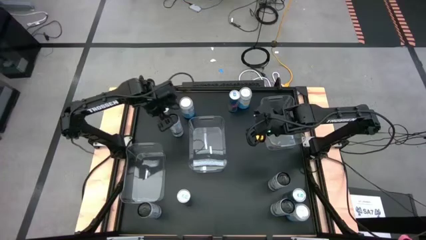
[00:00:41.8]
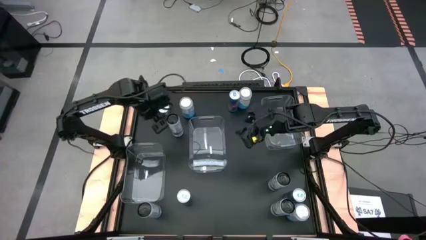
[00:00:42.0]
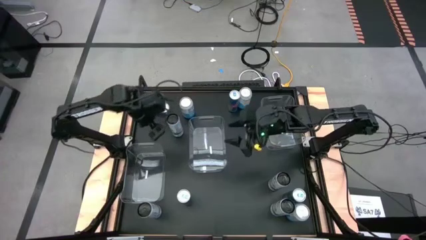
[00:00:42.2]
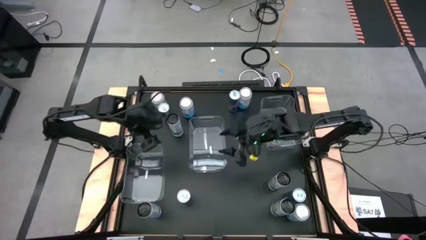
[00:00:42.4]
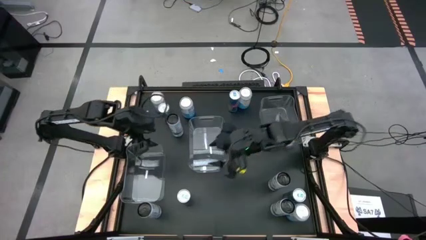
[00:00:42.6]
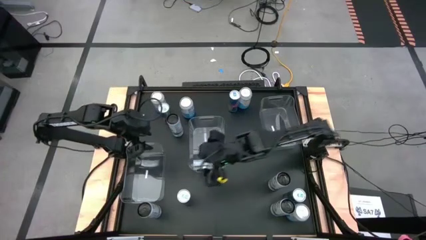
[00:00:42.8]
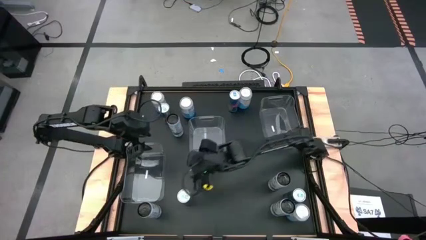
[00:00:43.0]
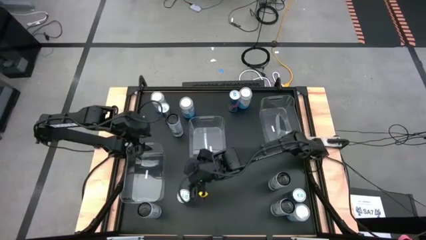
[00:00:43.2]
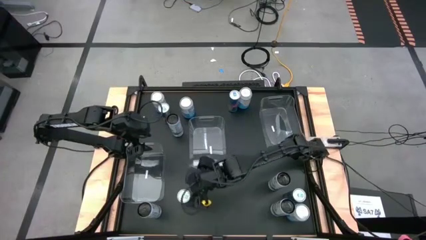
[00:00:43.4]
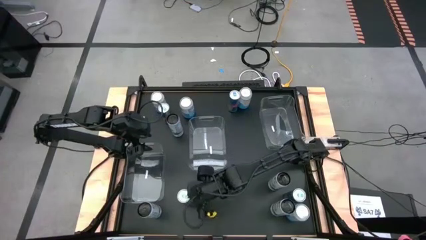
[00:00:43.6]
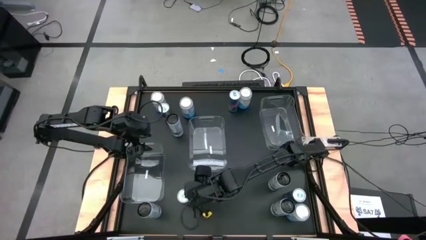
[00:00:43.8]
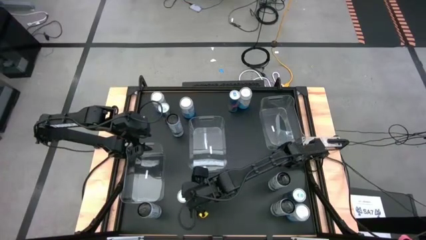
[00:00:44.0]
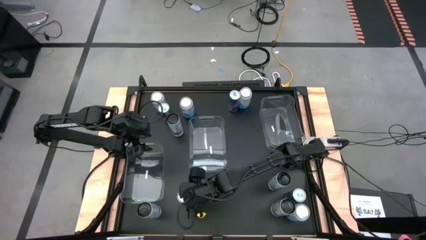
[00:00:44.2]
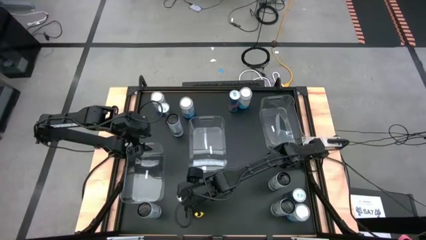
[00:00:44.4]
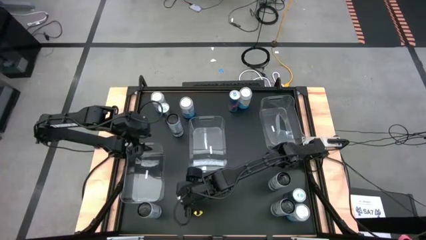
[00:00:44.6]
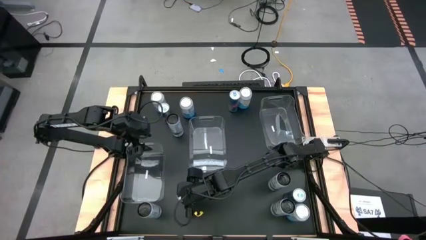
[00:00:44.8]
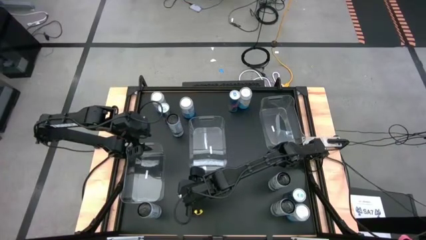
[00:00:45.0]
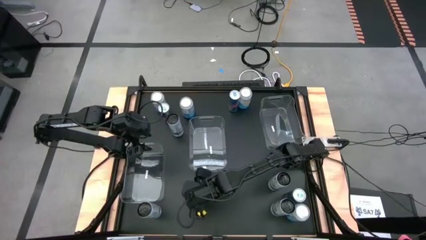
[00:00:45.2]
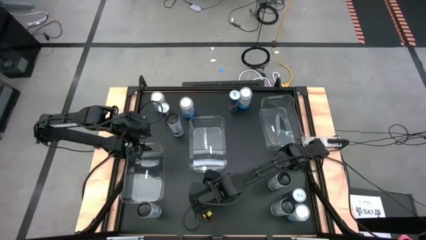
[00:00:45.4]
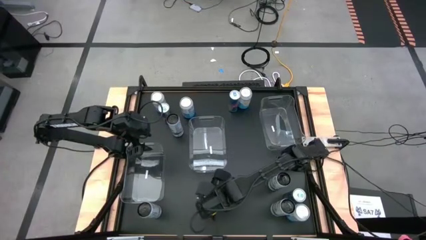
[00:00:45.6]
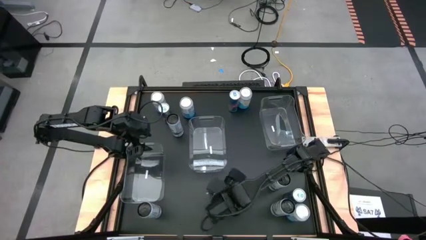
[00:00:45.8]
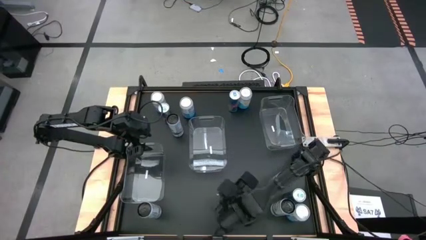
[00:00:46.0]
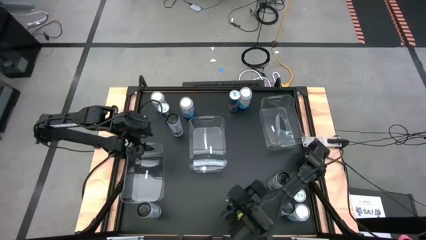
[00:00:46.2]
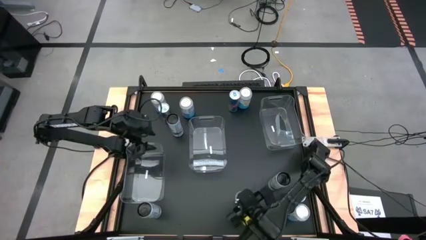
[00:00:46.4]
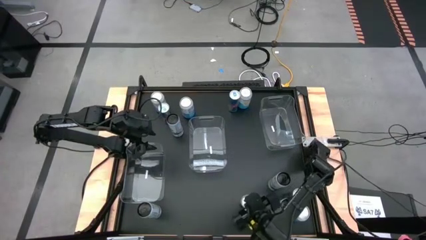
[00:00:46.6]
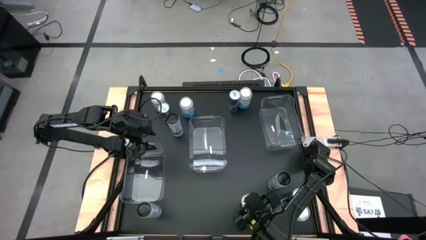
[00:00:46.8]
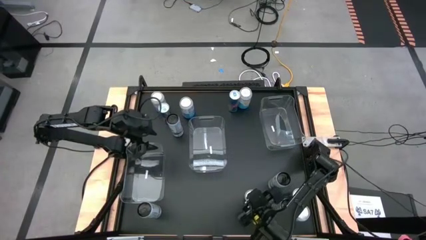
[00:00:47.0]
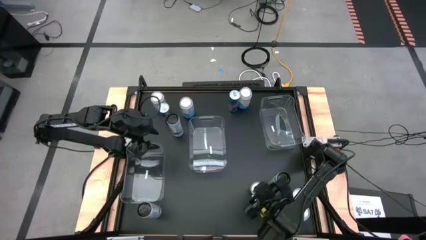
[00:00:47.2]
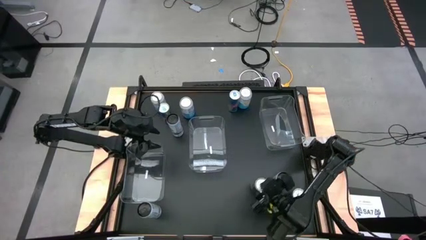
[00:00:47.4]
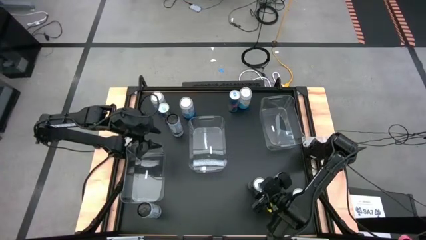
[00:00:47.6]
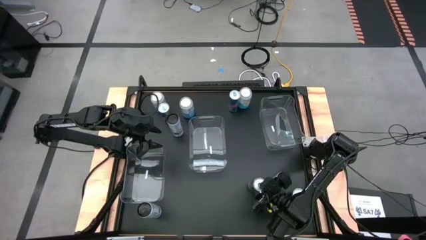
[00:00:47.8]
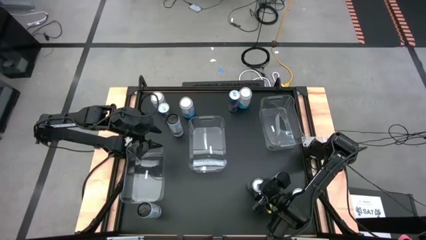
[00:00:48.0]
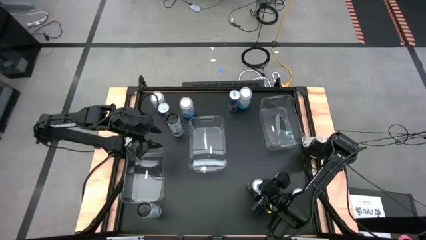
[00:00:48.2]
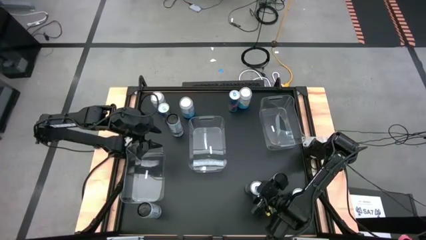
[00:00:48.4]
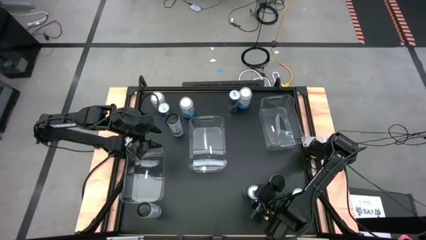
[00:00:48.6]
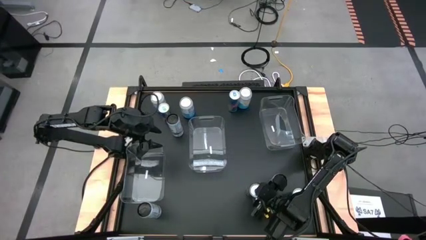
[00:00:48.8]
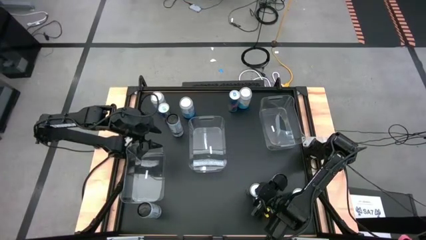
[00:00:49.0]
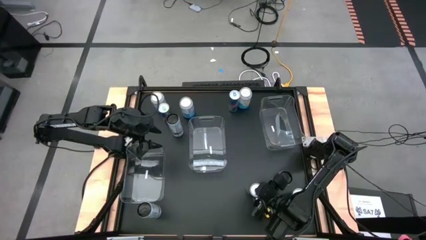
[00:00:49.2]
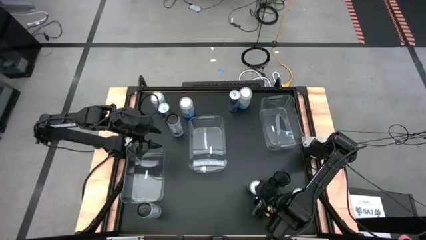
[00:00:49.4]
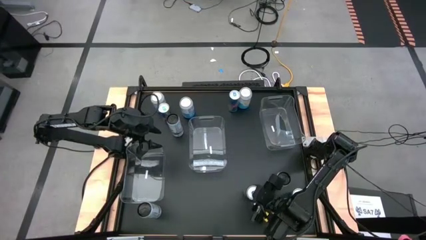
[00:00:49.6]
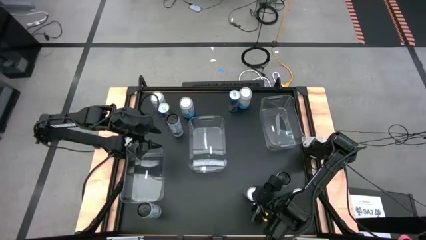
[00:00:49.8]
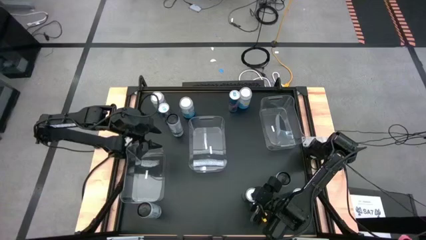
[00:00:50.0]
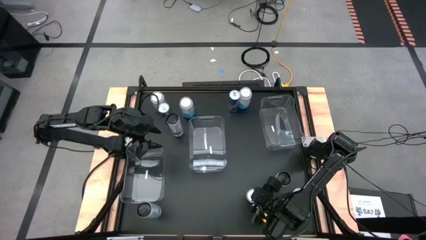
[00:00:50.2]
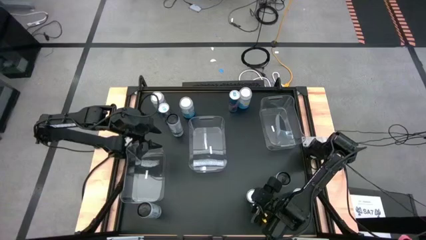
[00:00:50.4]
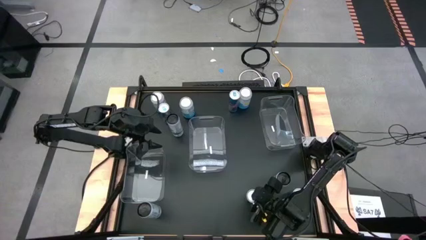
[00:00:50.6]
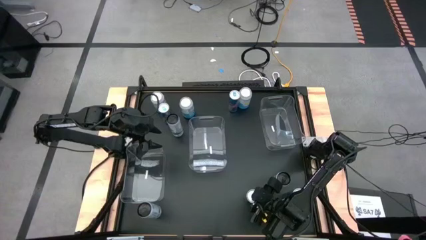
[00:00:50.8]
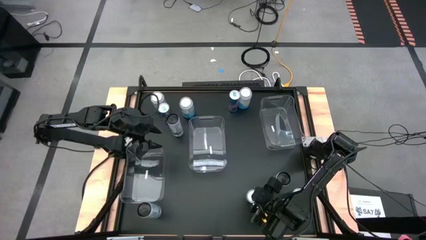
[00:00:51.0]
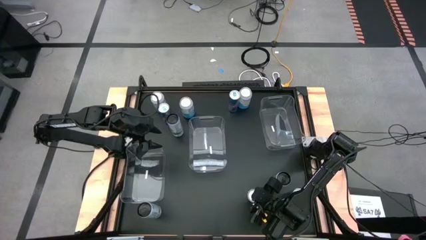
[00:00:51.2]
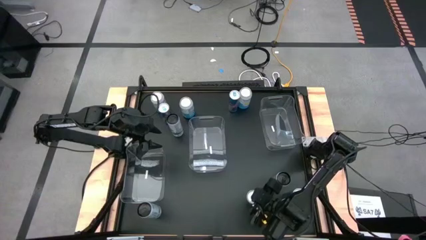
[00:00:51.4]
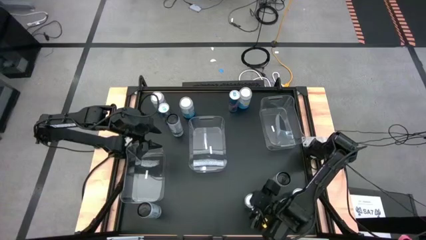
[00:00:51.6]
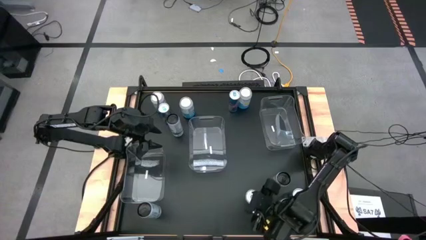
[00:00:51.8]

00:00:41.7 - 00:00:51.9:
Task: Sort soda cans
Move the bottom left blue soda can to the bottom right of the table

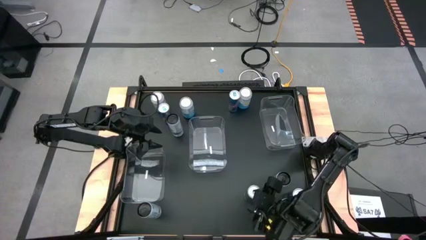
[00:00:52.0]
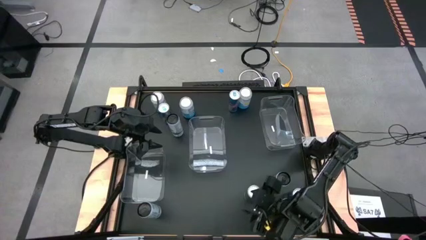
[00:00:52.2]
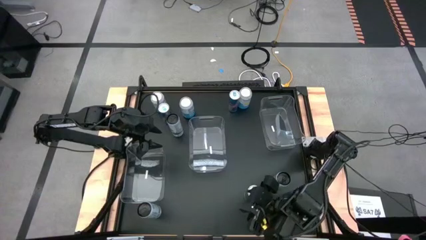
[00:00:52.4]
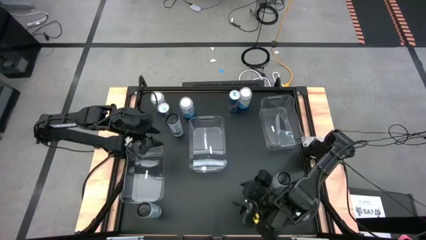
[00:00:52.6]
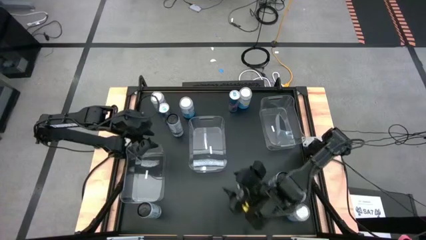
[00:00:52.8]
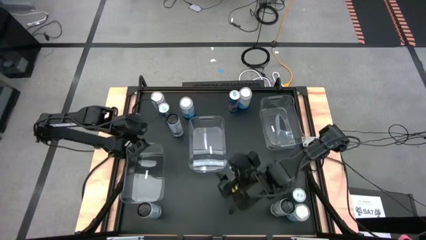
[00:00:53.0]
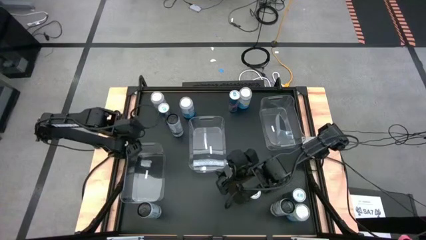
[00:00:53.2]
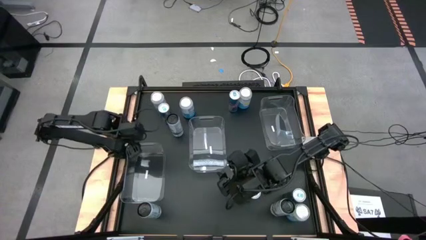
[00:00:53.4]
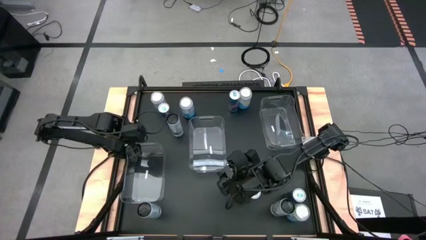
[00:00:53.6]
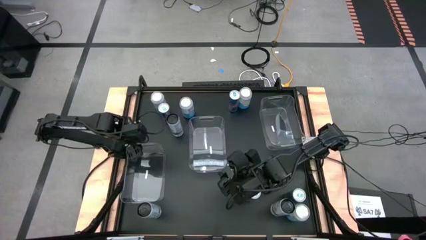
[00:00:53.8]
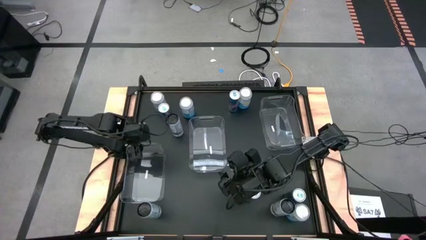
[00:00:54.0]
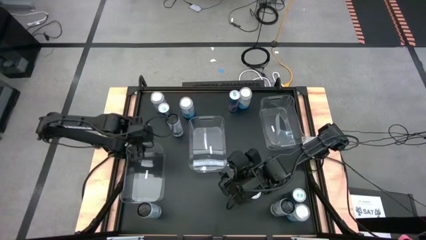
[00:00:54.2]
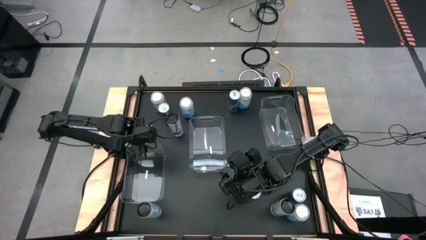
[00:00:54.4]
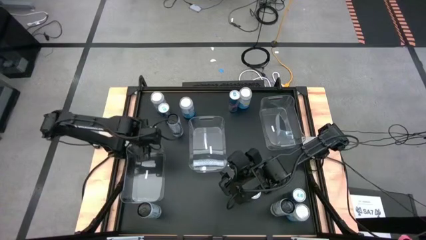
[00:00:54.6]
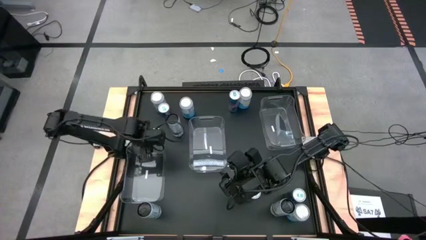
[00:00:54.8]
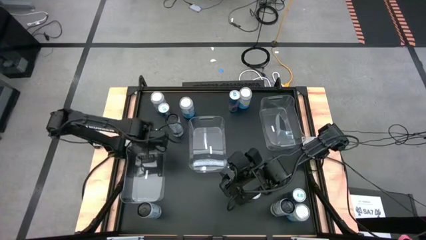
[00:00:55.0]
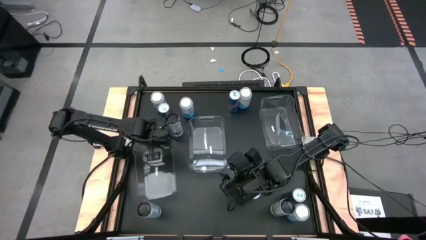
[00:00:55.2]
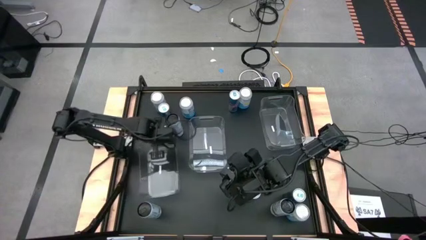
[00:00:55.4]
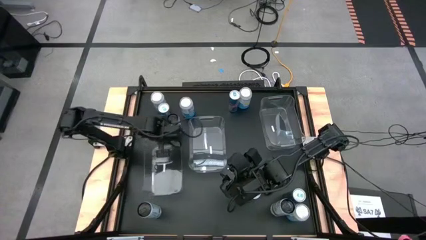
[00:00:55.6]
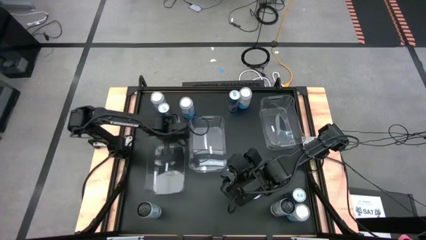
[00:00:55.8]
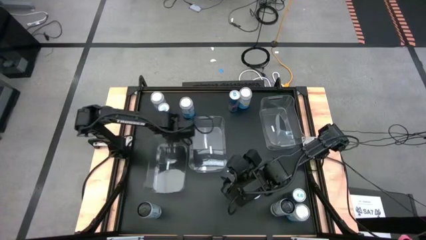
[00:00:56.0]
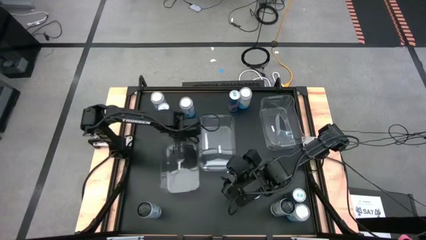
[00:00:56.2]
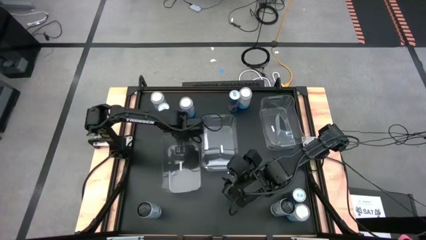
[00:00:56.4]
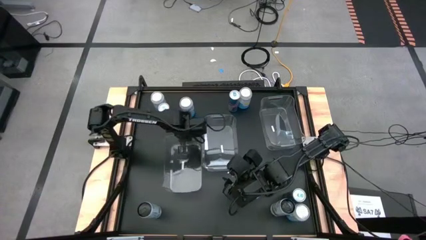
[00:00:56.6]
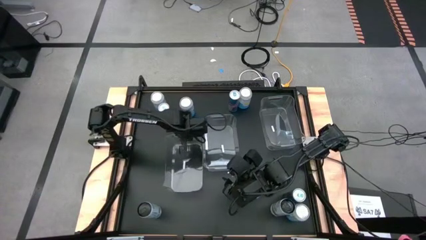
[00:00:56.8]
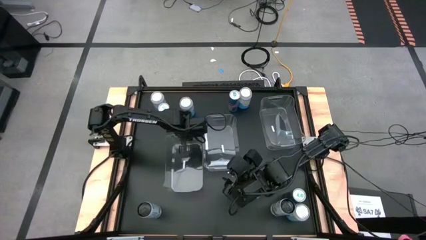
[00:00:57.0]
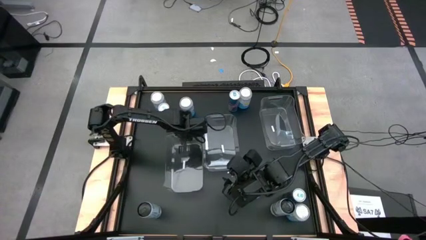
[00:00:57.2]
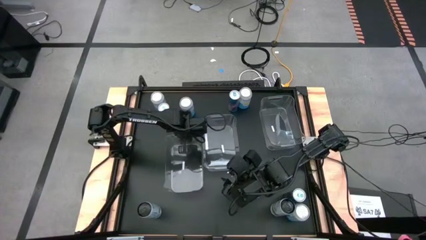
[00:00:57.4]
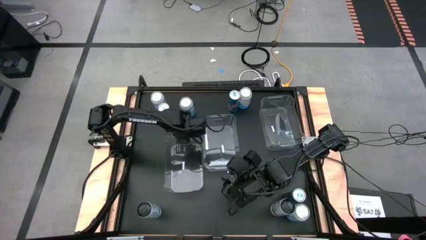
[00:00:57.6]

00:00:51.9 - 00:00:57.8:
Move the left transparent bin to the left side of the middle transparent bin
